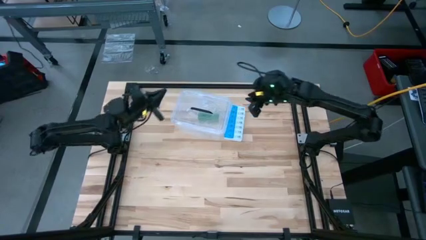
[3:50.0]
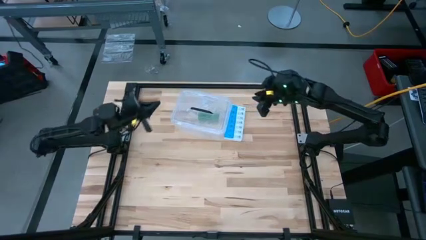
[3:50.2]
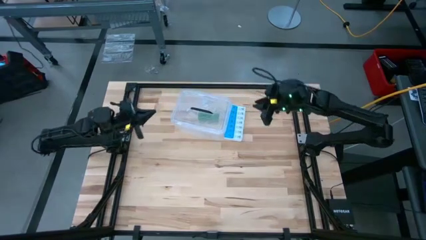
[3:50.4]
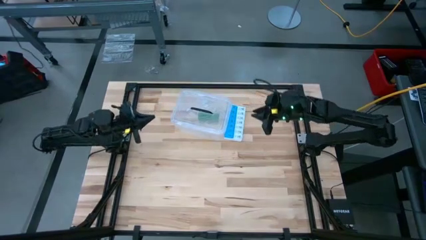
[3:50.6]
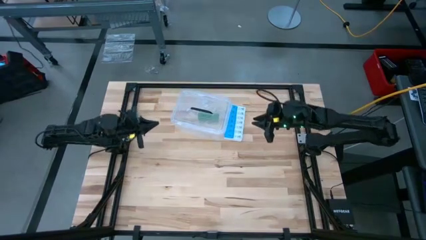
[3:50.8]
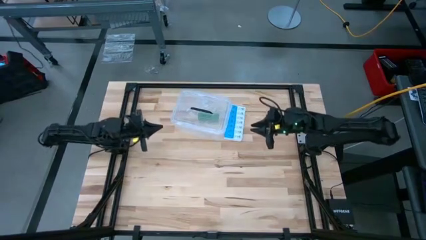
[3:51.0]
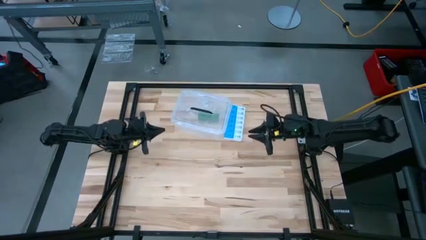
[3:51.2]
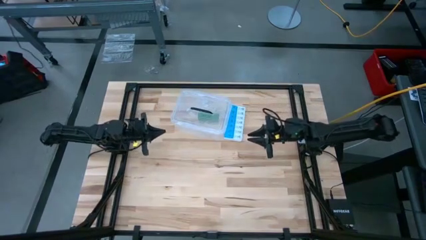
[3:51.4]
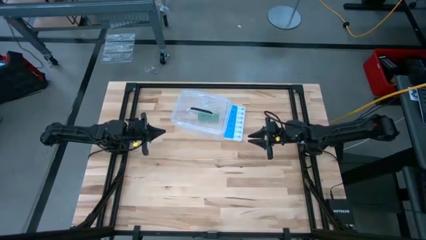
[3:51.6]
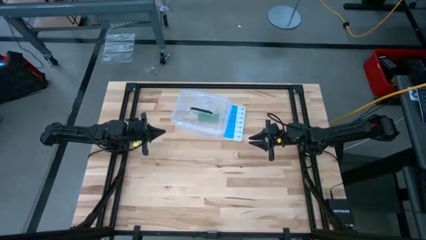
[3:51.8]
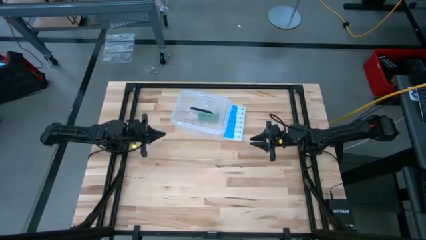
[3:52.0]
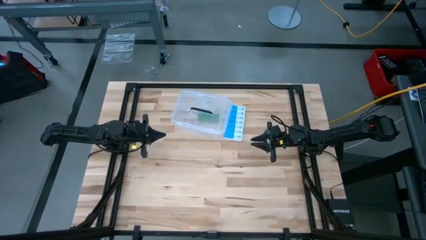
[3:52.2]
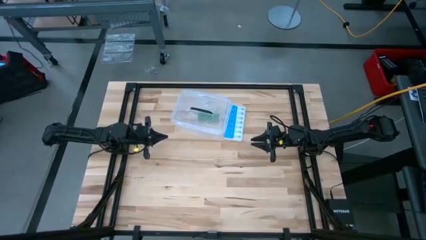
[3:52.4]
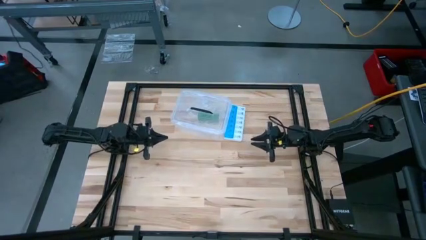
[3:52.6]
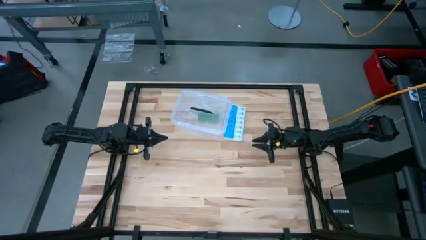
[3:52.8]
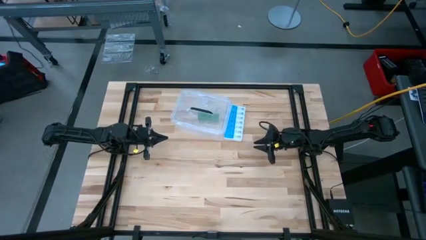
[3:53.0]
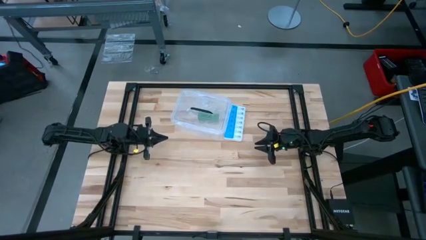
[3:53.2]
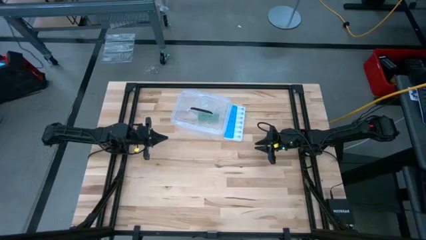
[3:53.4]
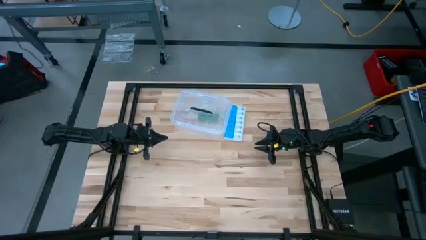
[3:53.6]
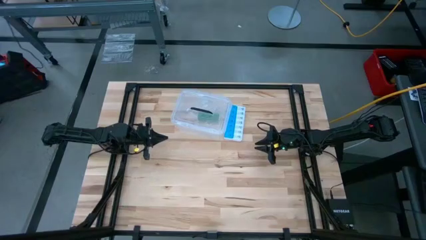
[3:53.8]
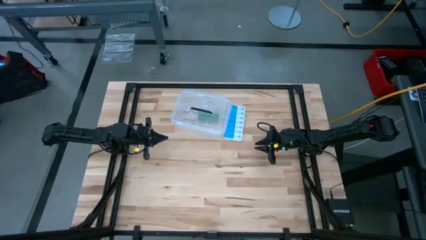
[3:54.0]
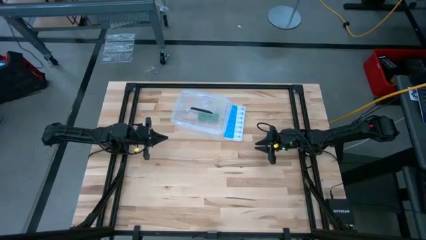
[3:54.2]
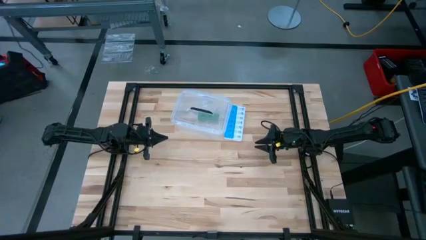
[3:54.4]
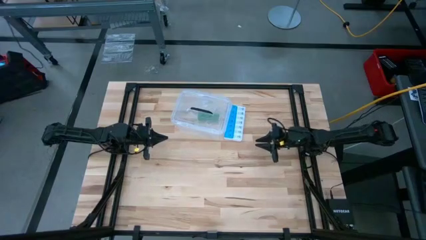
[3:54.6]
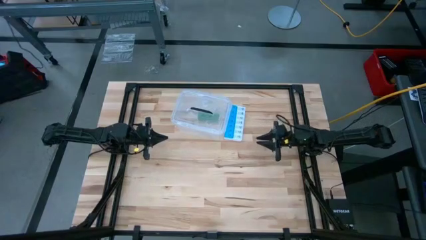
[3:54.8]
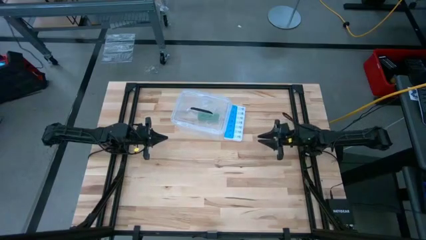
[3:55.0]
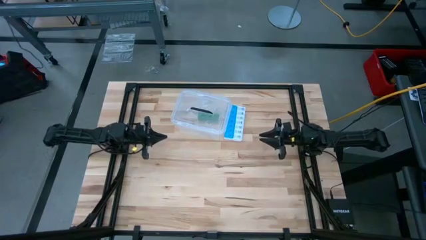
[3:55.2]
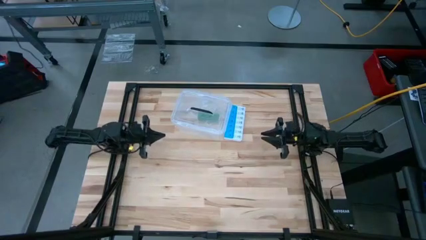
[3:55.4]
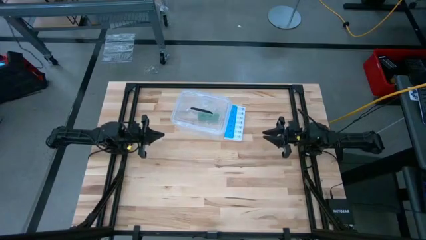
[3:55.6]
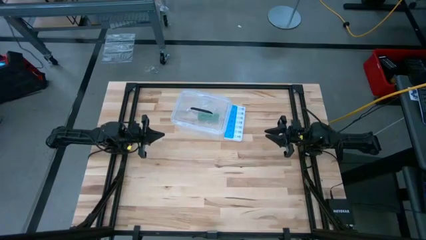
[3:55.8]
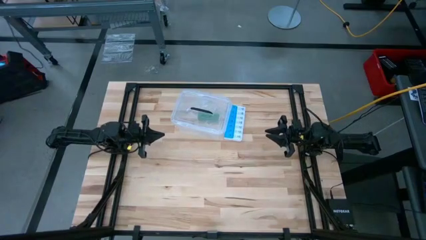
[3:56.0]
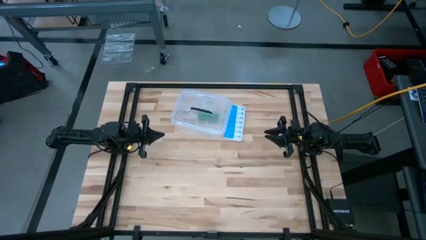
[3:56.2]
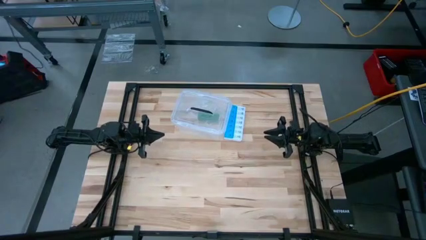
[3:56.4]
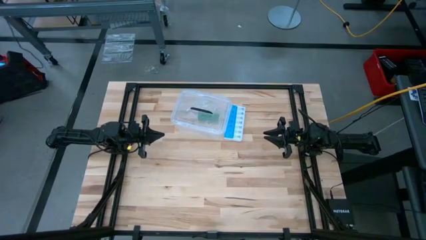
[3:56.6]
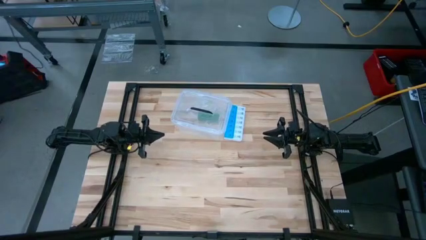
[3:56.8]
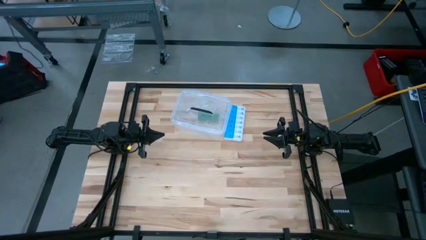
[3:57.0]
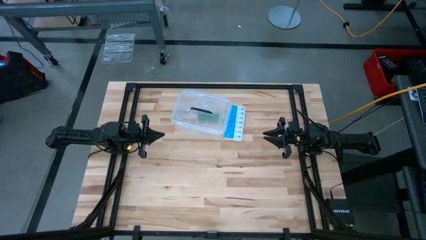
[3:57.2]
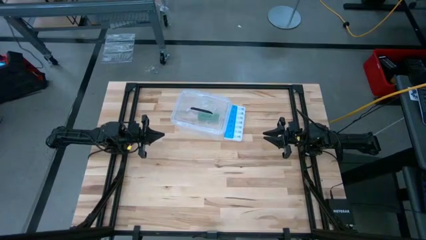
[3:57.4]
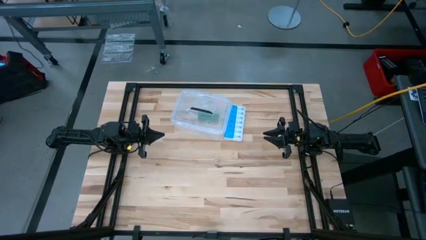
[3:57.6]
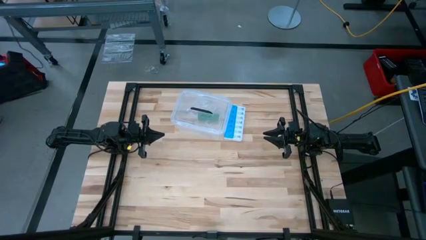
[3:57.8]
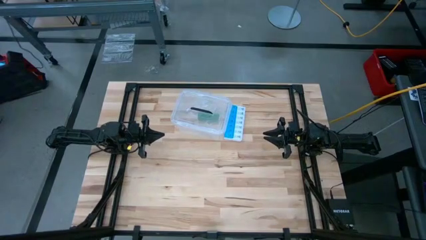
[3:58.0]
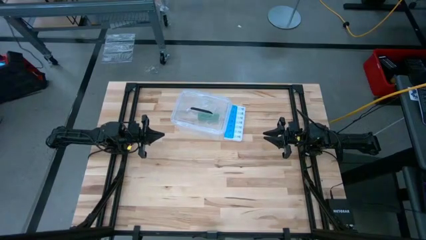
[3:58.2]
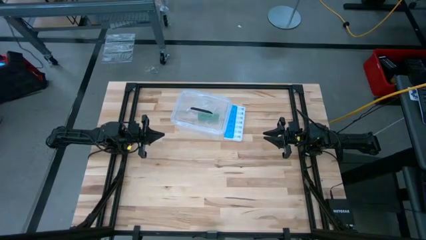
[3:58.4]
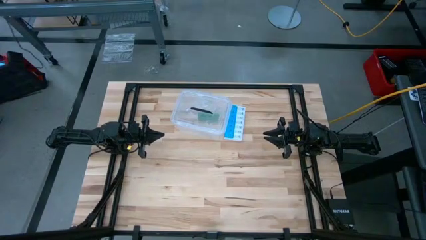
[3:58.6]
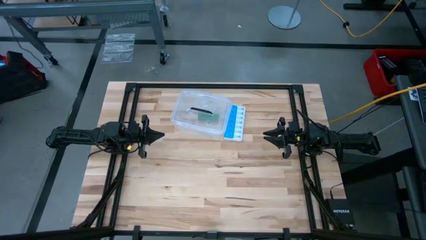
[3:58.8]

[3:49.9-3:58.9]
Task: Roll bandage
Return to Home Position

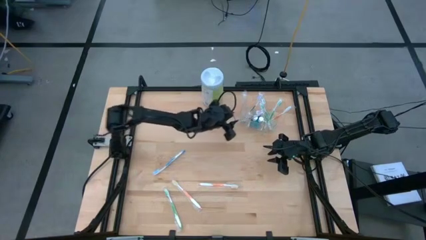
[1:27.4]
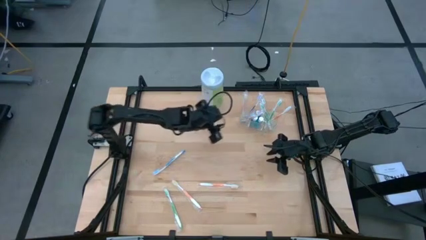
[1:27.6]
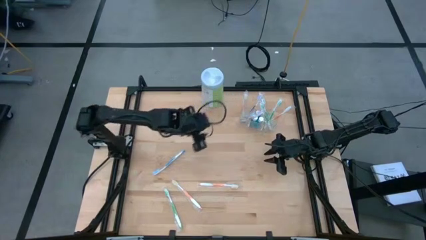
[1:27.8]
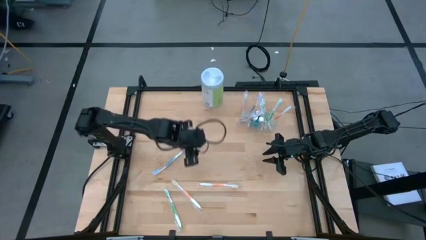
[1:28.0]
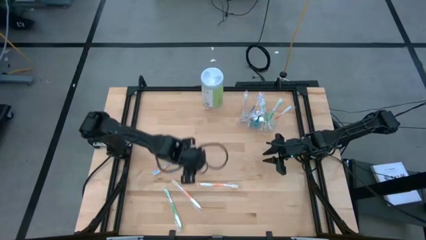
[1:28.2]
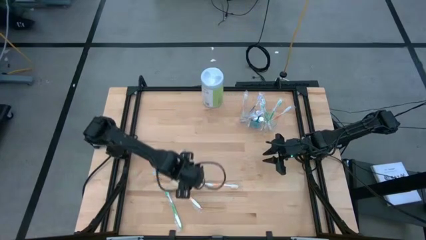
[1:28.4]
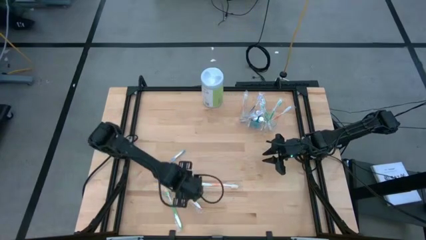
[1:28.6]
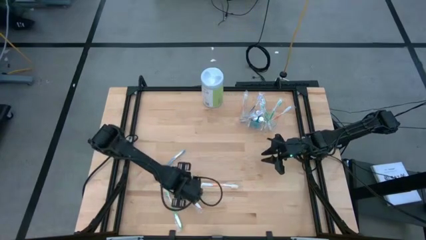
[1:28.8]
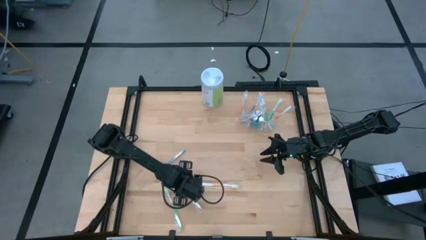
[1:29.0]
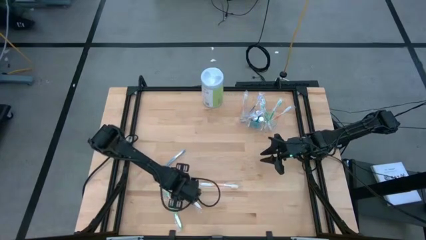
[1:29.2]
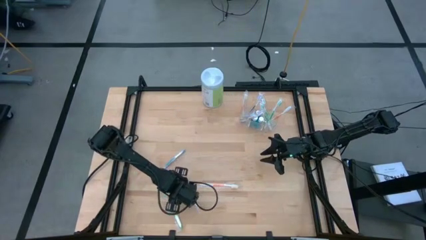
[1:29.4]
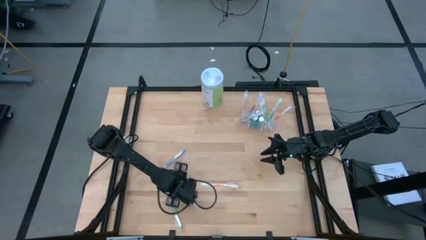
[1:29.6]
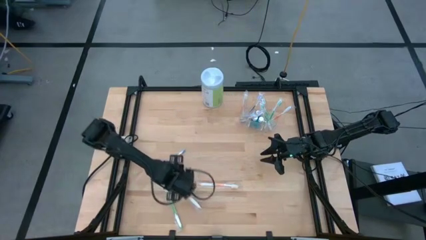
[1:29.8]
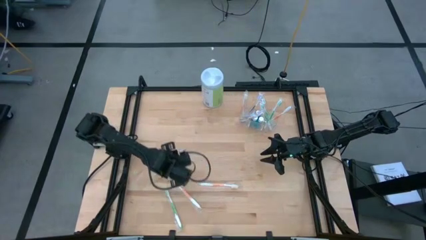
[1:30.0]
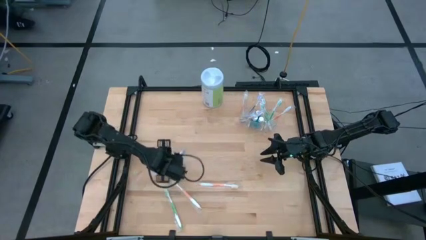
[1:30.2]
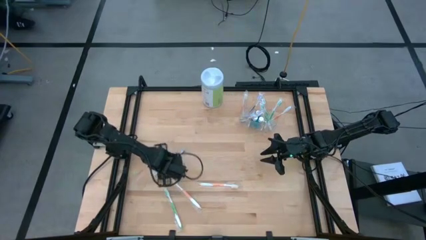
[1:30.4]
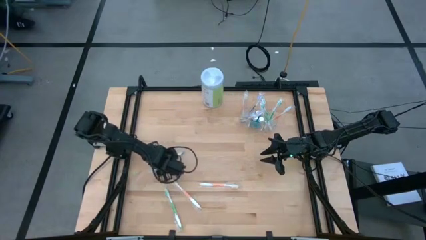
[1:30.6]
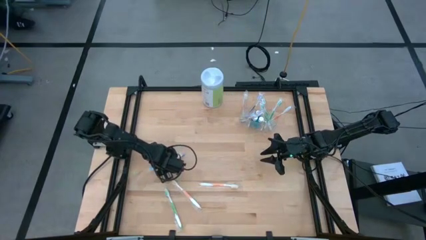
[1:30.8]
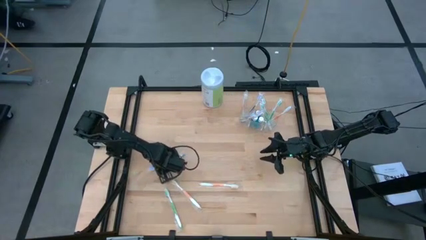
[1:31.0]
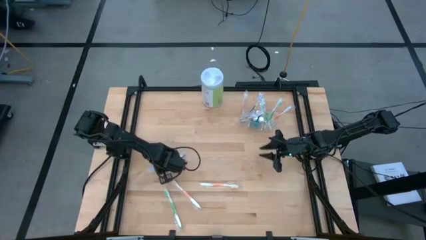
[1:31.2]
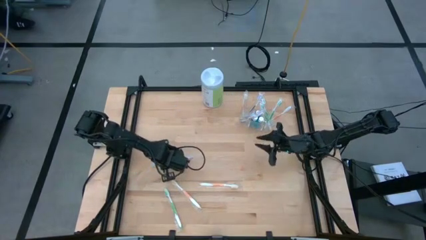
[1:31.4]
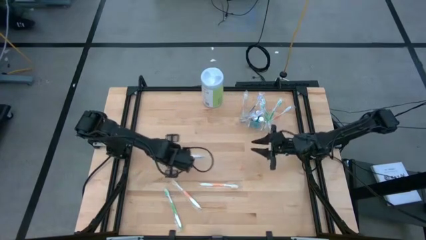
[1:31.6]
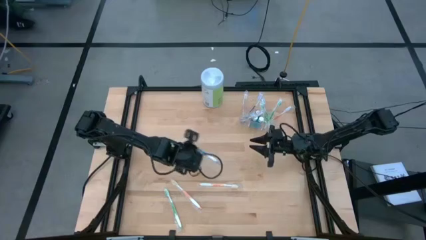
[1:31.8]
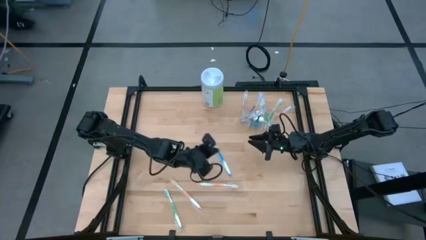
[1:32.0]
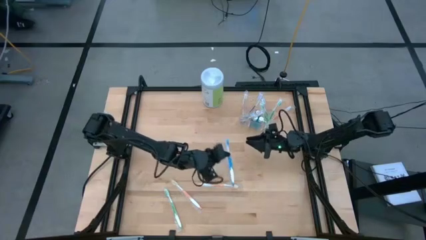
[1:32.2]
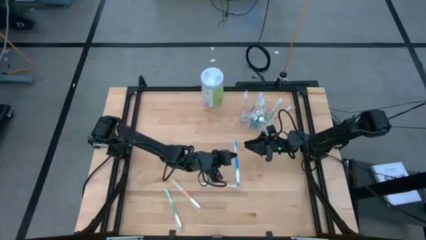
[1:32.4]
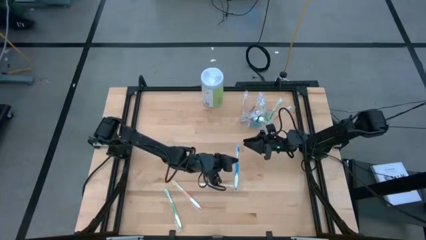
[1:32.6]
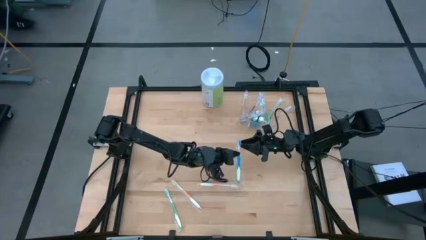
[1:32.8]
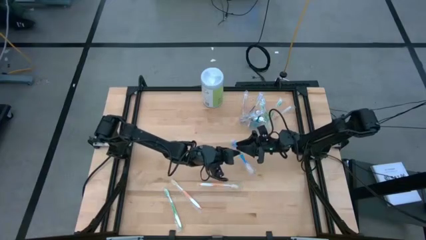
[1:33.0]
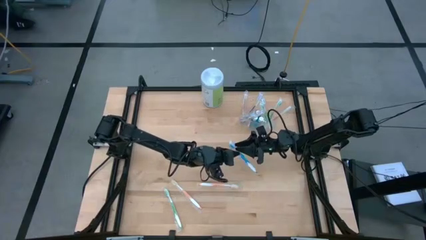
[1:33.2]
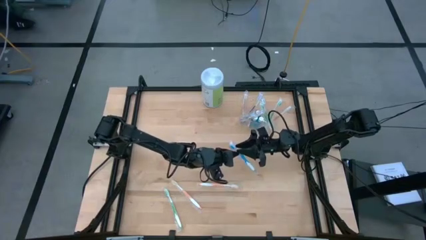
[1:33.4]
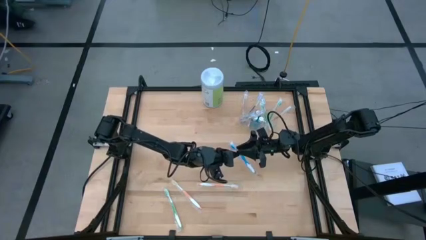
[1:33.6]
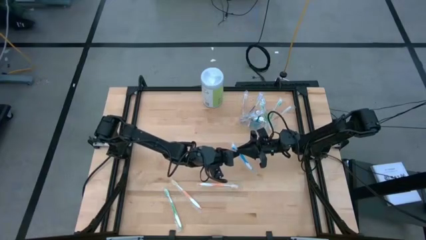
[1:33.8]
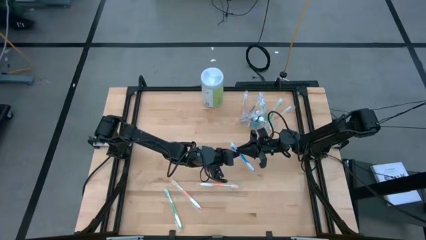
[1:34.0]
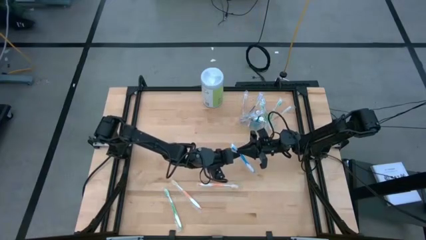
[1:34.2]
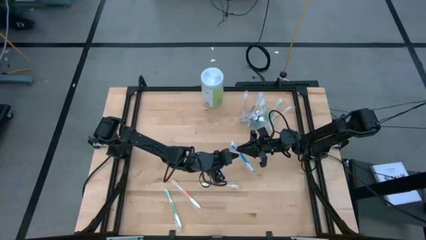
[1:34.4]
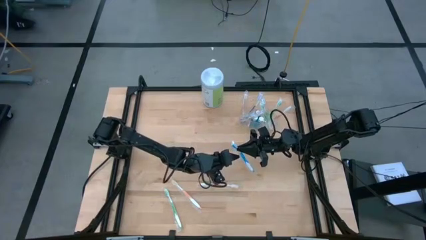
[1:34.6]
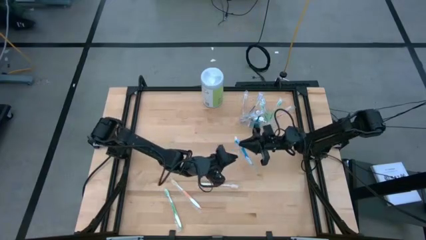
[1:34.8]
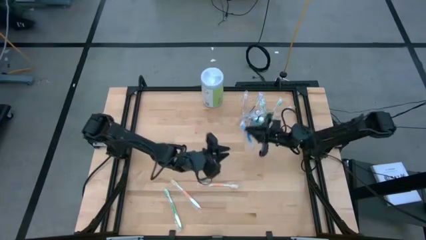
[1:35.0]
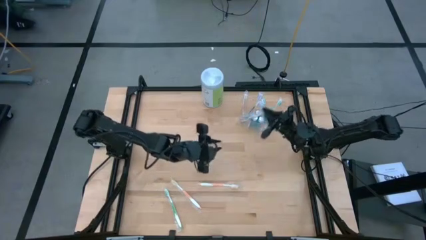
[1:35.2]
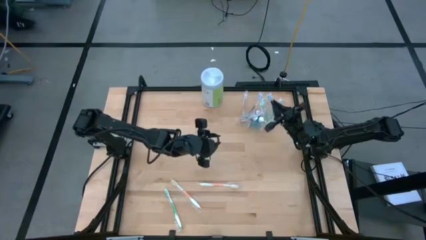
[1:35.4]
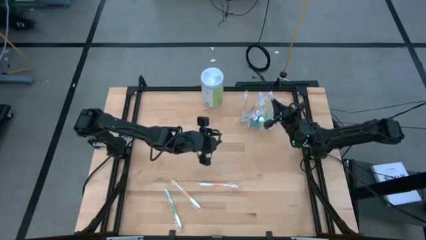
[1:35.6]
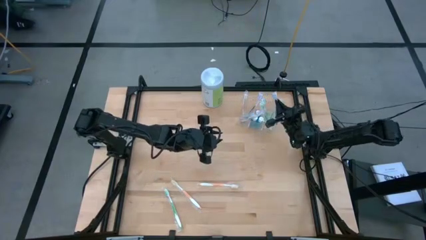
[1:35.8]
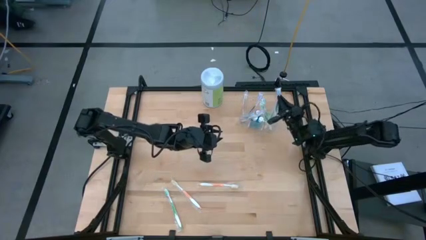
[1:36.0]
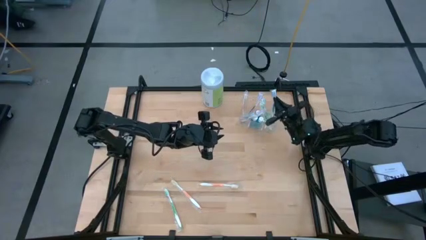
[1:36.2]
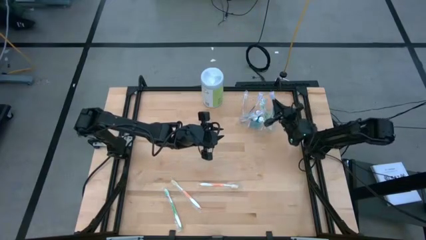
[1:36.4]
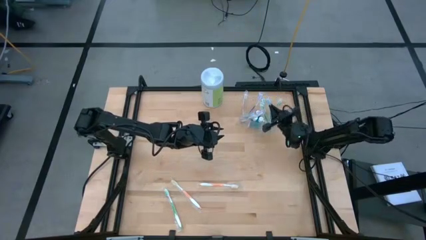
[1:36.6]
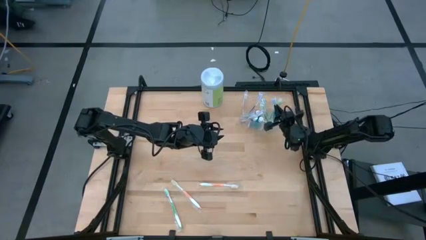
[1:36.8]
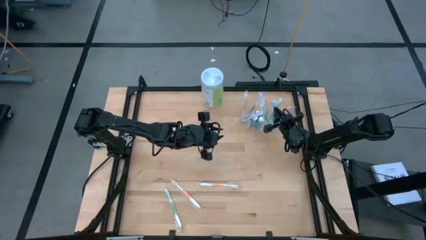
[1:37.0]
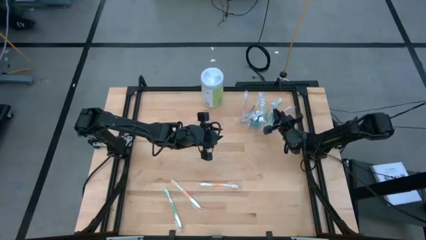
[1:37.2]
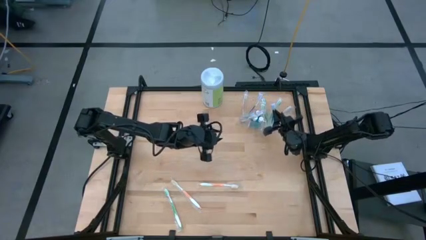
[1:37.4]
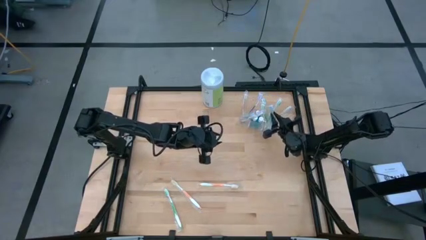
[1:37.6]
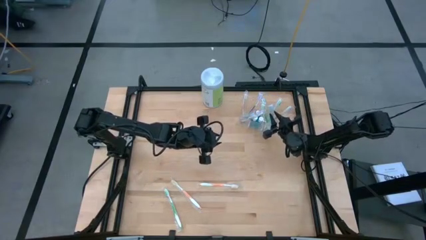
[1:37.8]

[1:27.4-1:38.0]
Task: Pick & Place toothbrushing station
Put the blue toothbrush into the transparent organizer
